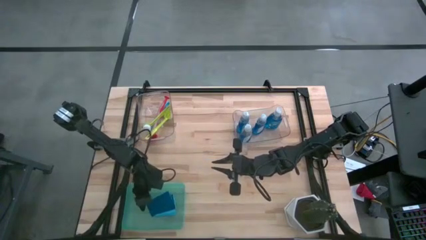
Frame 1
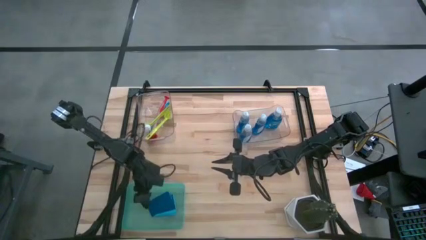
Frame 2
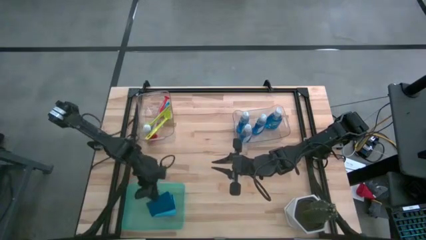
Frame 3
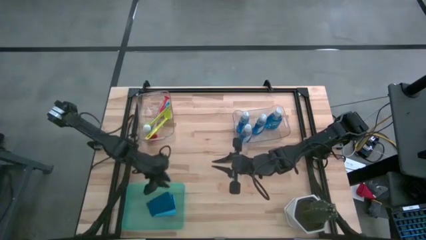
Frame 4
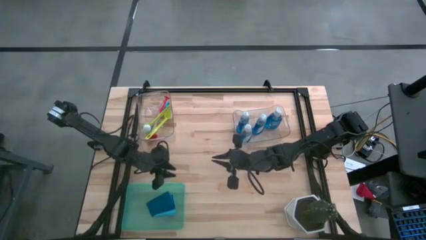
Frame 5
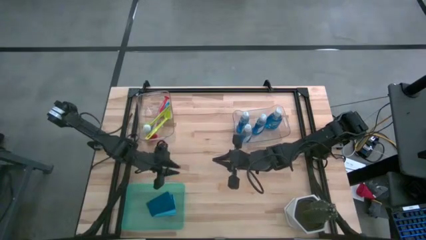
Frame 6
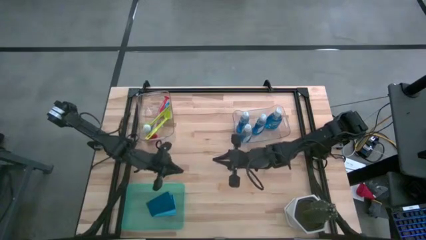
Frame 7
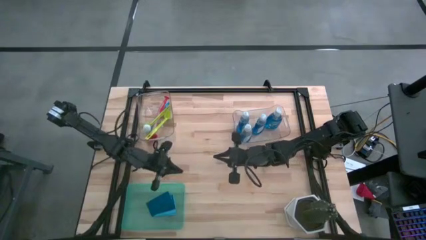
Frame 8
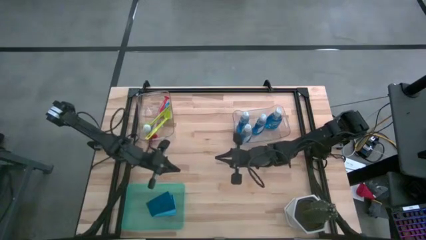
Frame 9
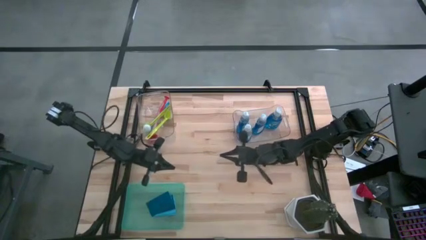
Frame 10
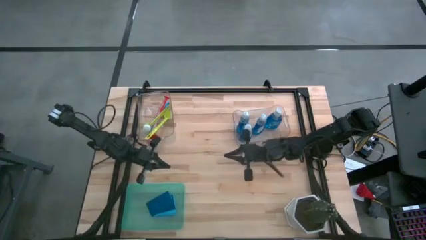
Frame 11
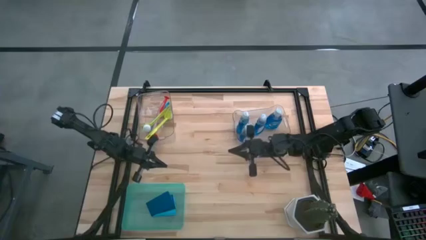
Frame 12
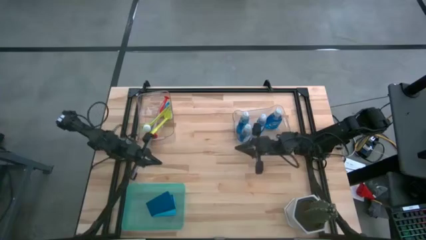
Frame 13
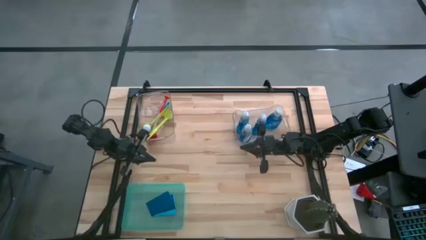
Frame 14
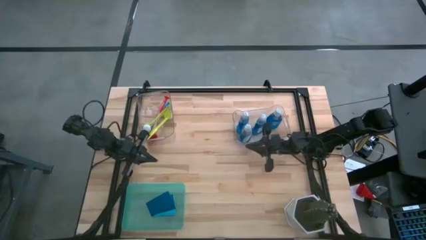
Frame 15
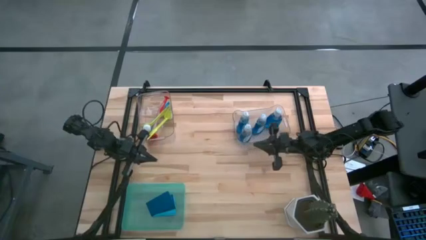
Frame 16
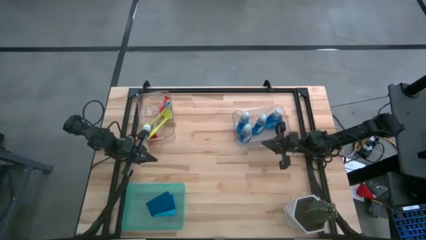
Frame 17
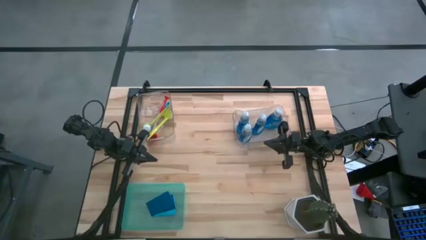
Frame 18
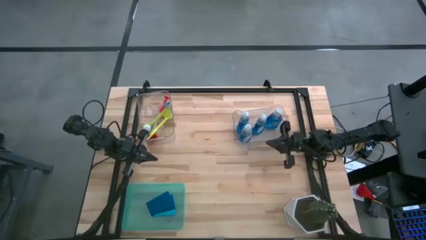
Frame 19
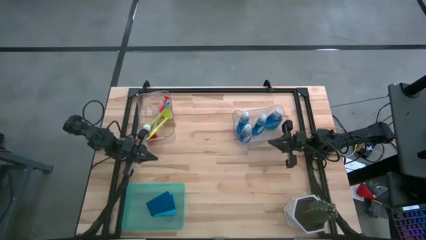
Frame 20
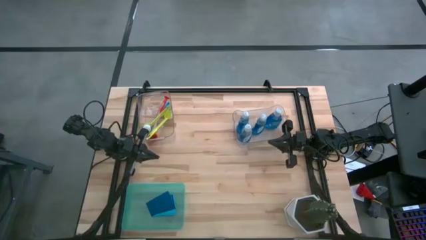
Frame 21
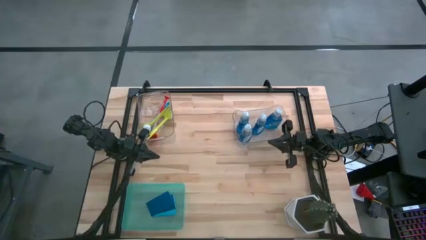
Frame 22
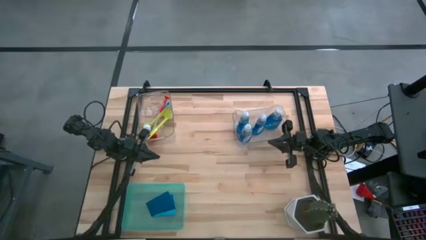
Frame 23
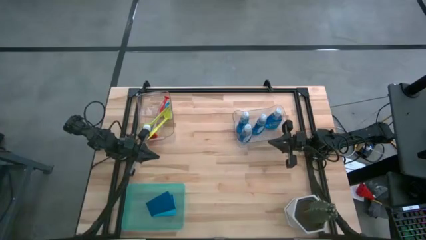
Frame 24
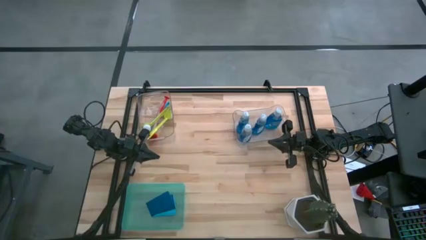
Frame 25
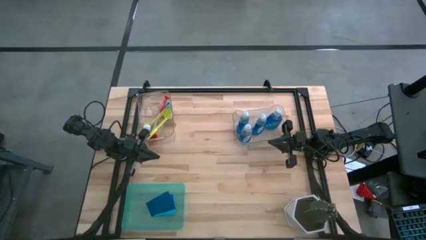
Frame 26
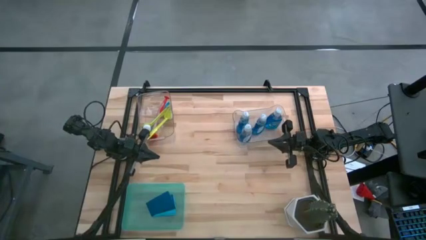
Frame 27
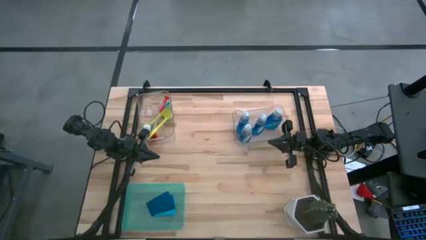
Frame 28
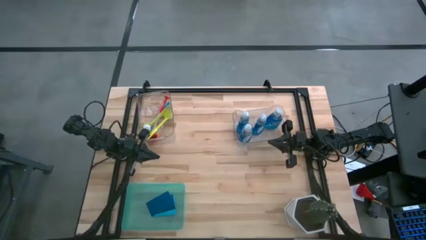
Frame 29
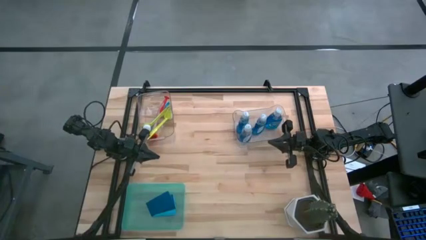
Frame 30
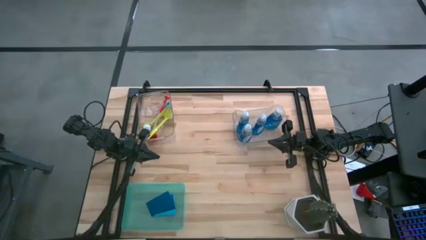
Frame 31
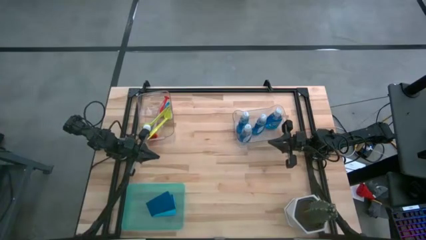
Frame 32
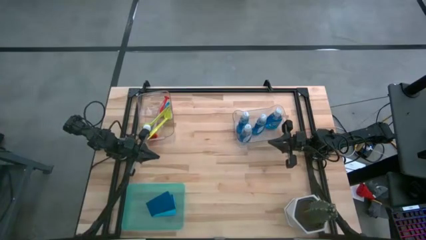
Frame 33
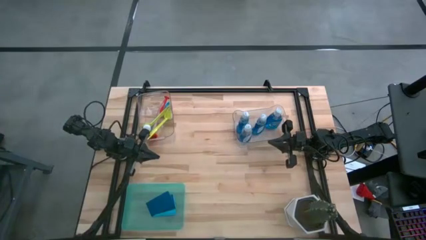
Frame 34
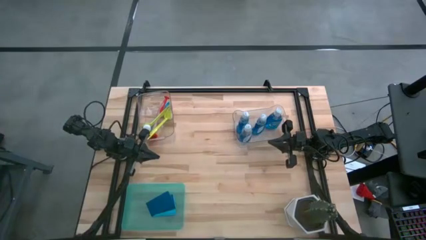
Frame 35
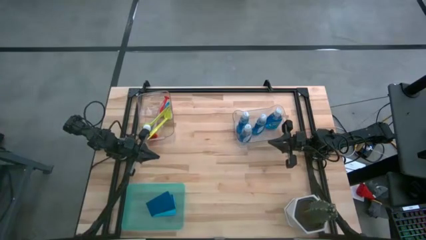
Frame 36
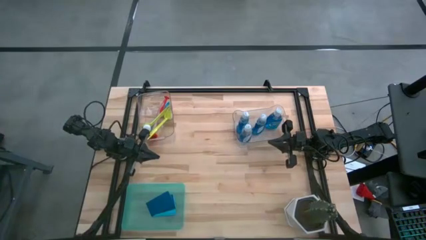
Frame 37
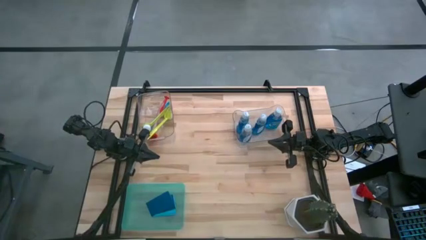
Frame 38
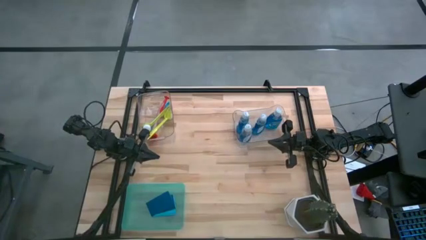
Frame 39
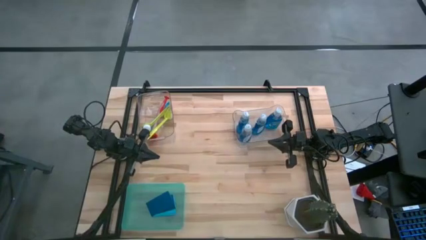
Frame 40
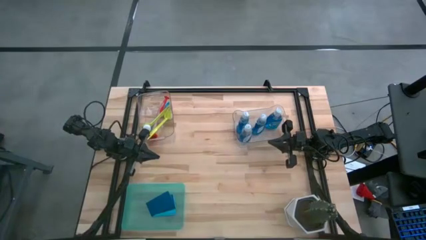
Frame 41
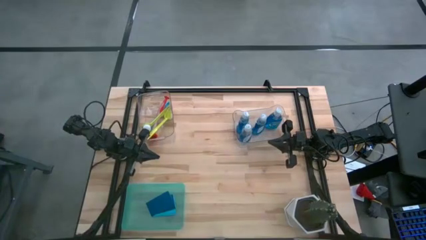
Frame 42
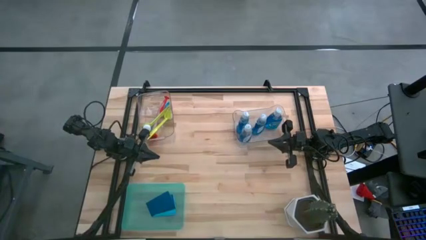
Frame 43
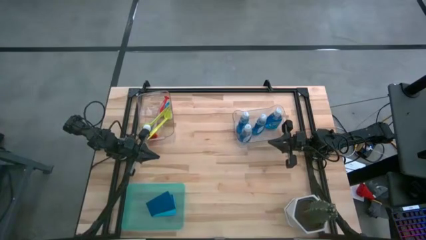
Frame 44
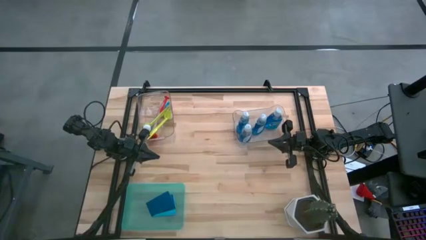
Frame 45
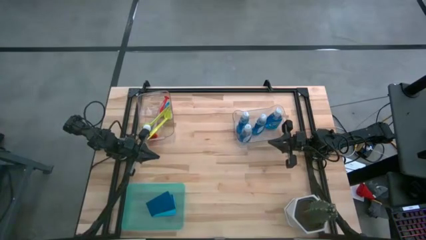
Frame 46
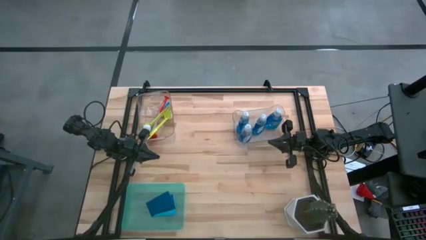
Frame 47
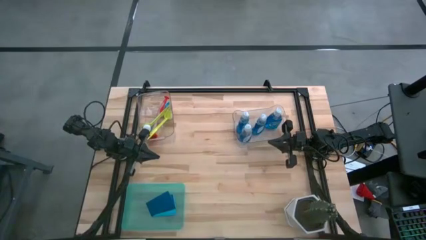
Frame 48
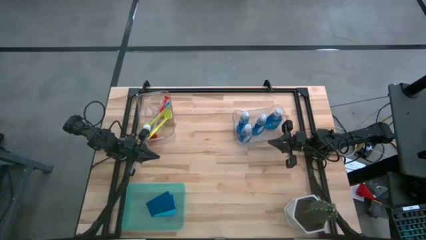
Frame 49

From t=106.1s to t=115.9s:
Task: Pick & Place Kitchen Sink Supplies
Return to Home Position

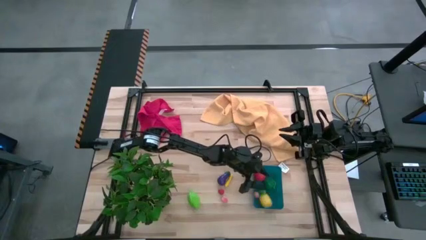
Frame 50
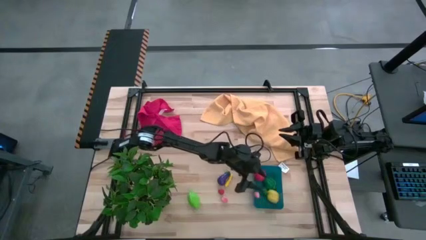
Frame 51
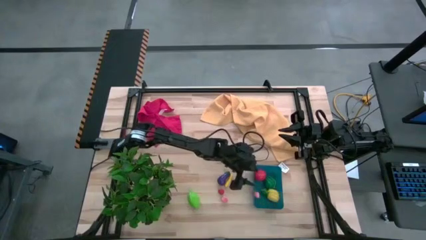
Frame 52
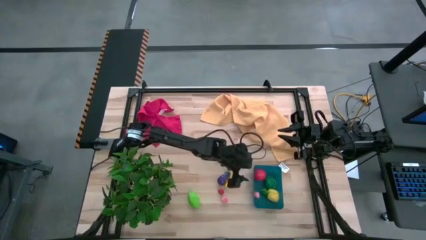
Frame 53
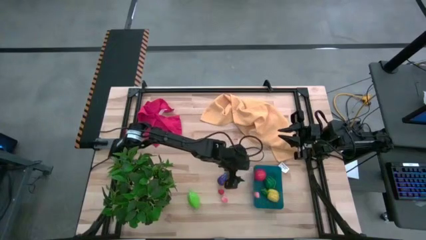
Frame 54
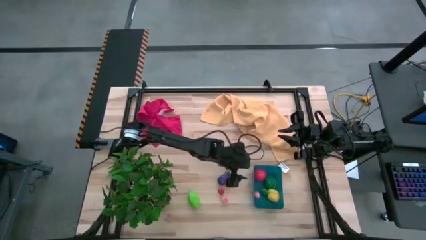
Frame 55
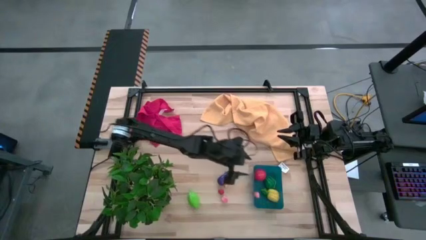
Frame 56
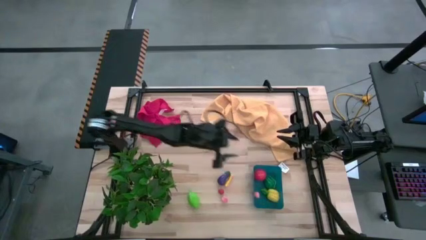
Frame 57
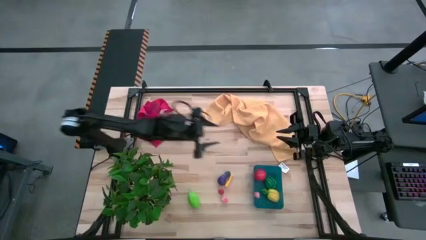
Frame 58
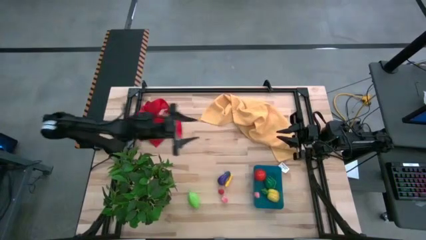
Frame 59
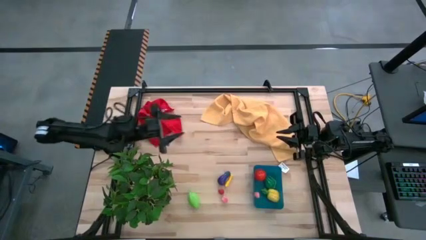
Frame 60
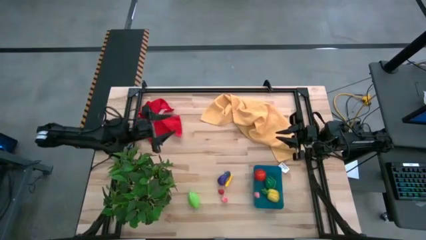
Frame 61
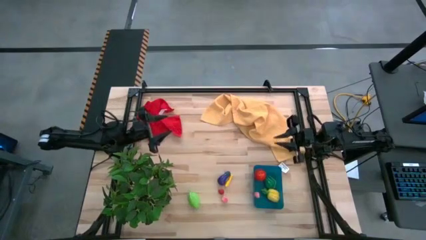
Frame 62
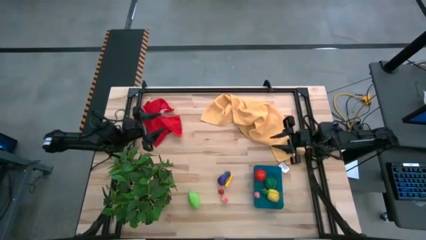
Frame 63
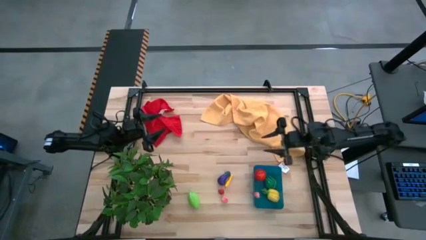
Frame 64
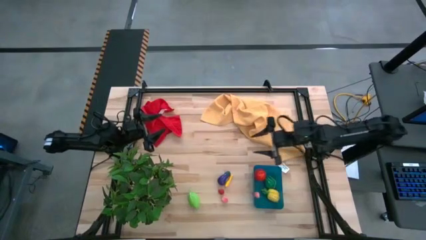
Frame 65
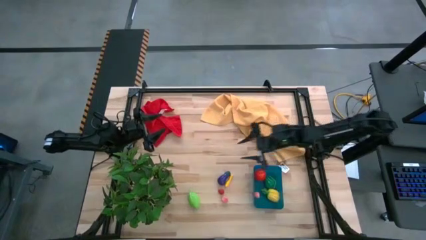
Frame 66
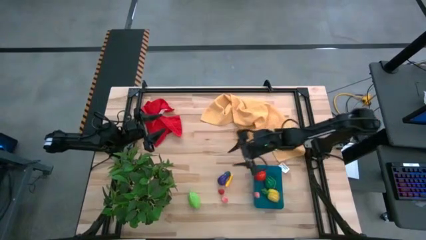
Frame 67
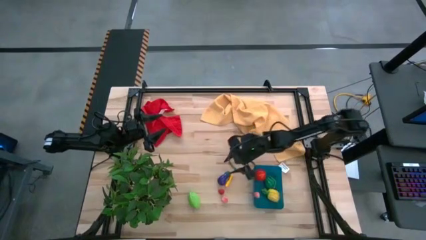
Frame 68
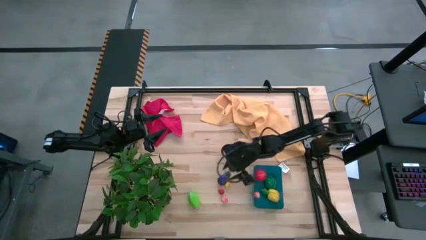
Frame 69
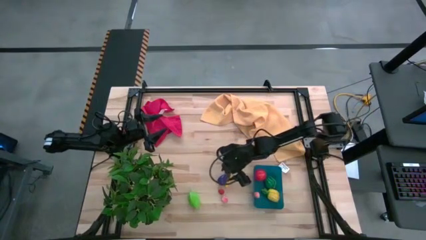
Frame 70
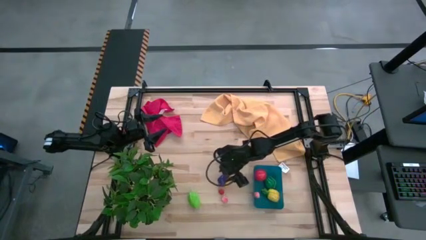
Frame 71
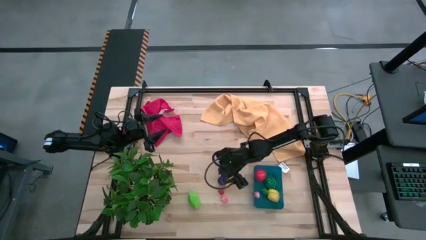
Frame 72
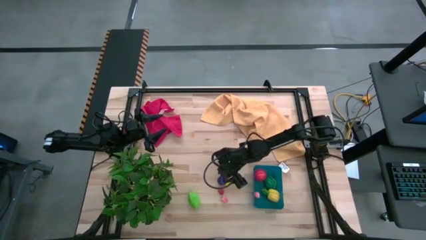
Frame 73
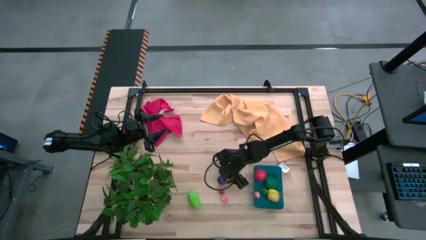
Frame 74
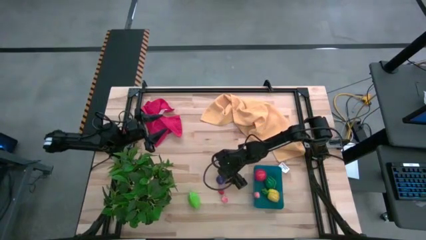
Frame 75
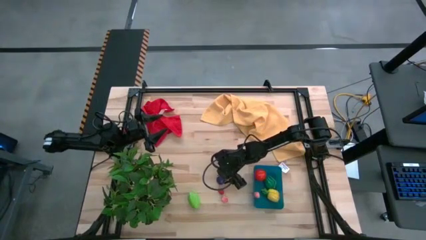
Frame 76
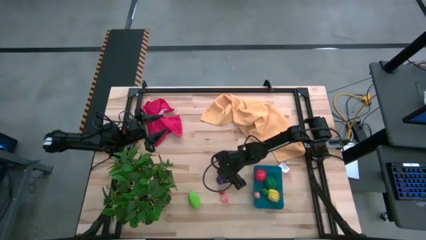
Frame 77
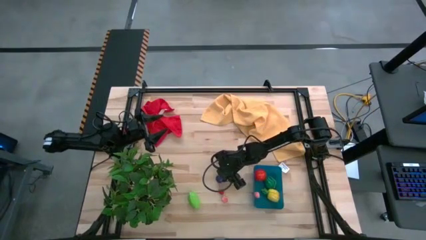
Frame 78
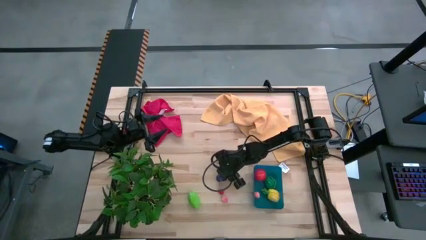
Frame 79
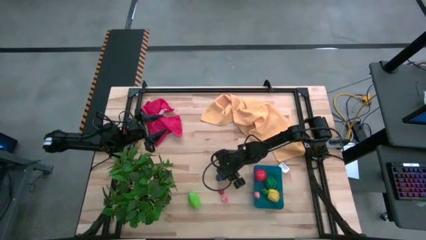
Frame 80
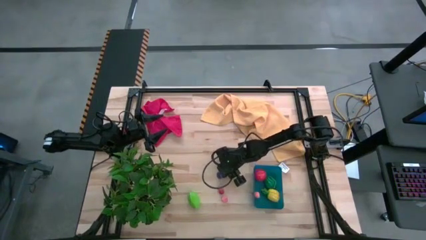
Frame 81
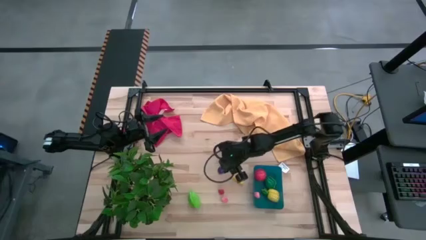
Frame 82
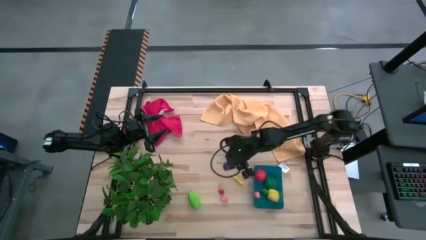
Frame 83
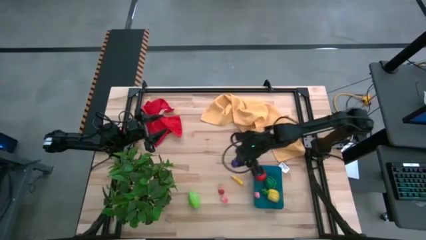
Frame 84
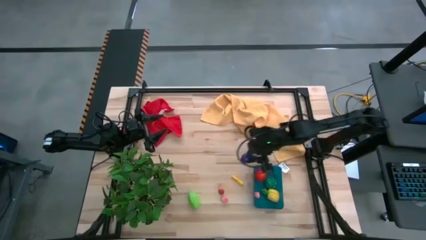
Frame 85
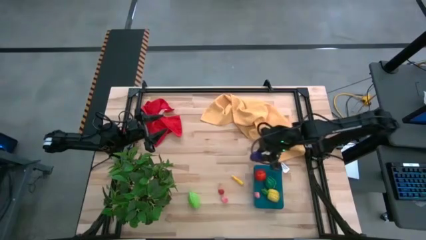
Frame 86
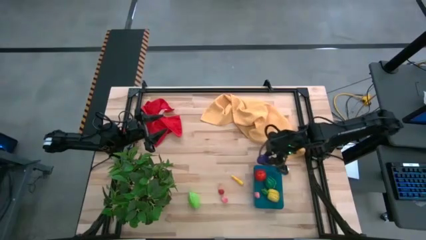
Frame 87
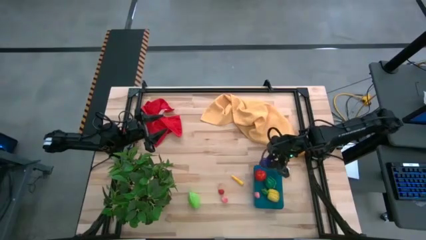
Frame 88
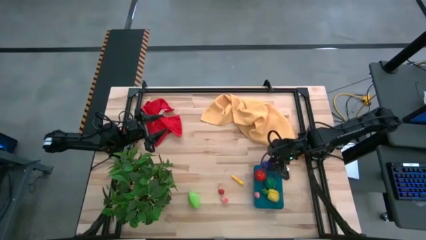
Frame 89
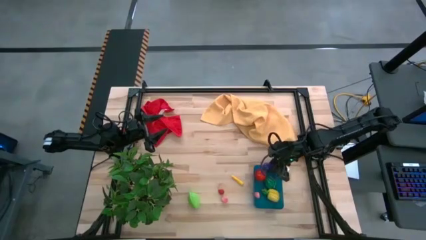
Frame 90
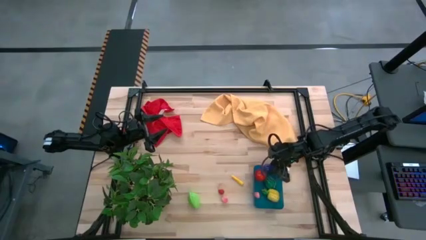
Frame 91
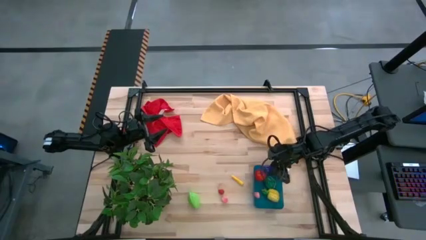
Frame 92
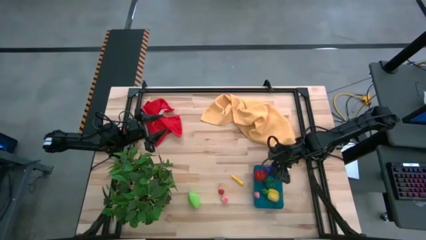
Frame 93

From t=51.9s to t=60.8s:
Task: Pick and placing Produce into tupperware
Put the purple eggplant into the blue bin
